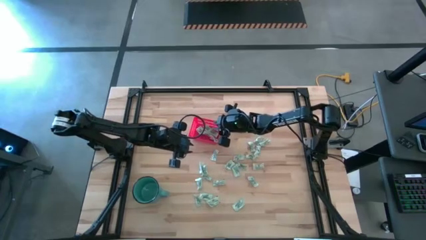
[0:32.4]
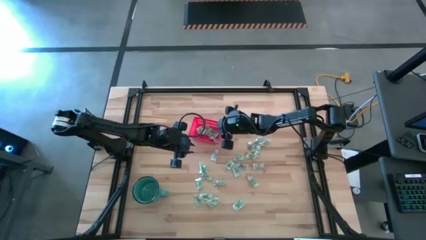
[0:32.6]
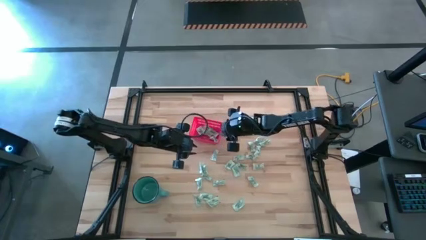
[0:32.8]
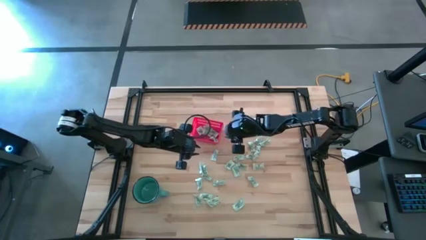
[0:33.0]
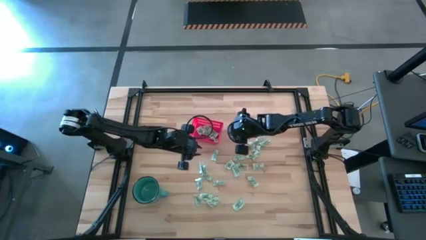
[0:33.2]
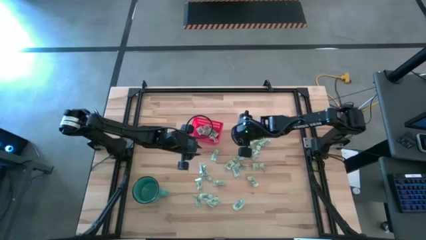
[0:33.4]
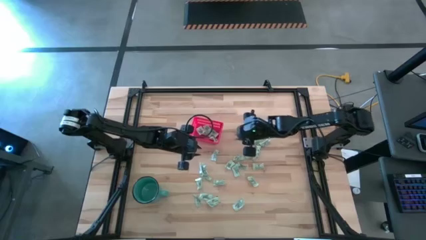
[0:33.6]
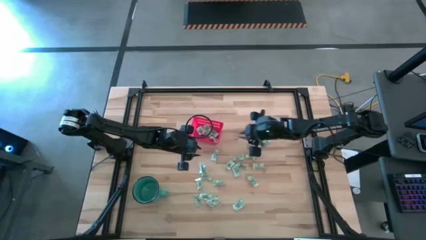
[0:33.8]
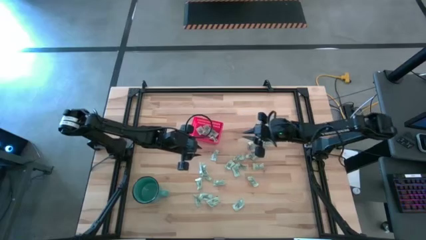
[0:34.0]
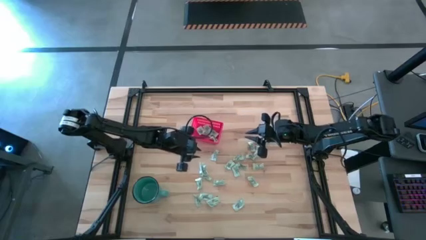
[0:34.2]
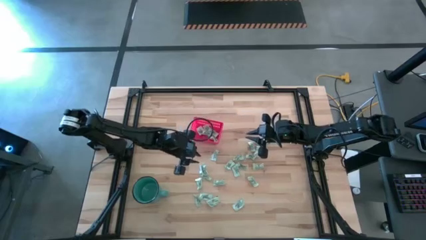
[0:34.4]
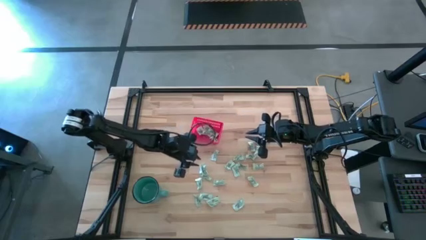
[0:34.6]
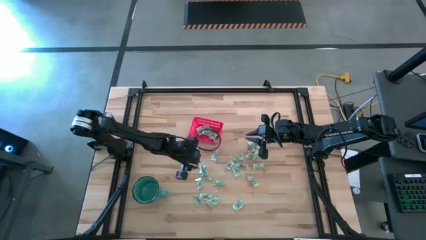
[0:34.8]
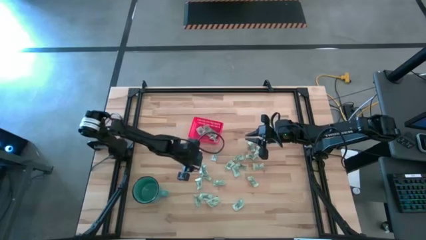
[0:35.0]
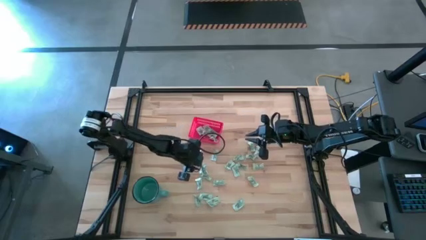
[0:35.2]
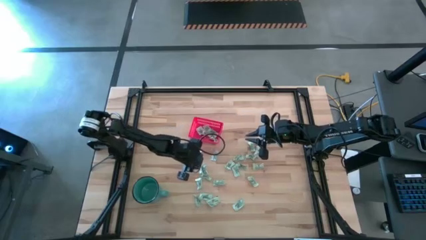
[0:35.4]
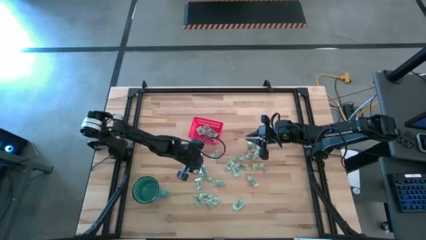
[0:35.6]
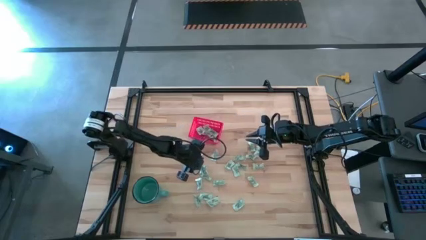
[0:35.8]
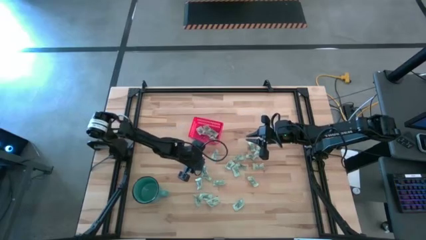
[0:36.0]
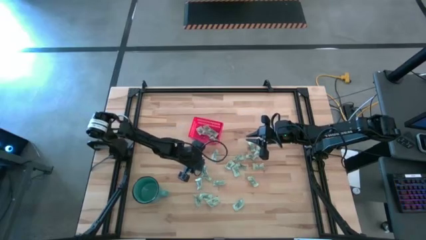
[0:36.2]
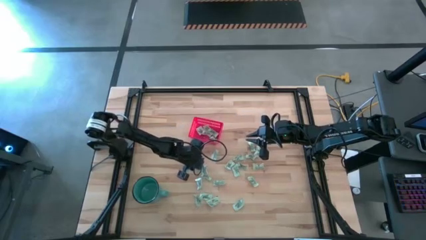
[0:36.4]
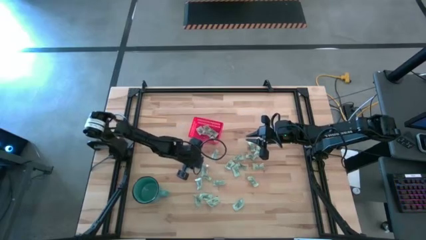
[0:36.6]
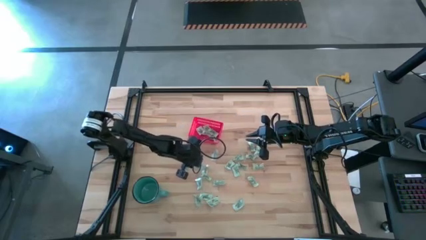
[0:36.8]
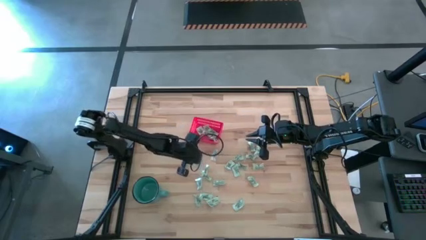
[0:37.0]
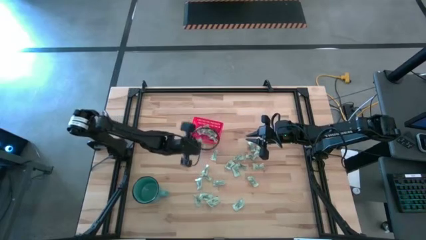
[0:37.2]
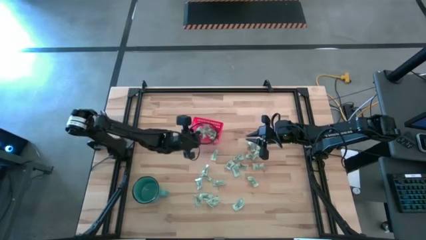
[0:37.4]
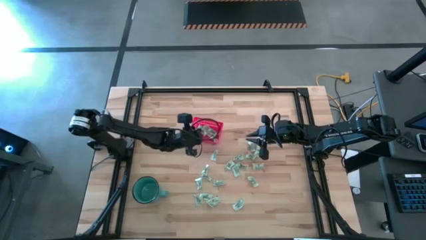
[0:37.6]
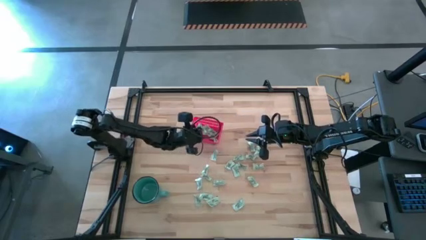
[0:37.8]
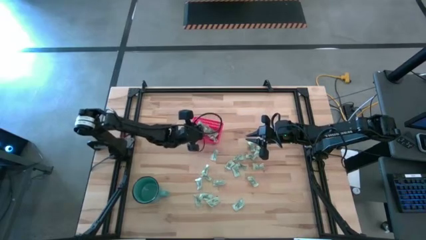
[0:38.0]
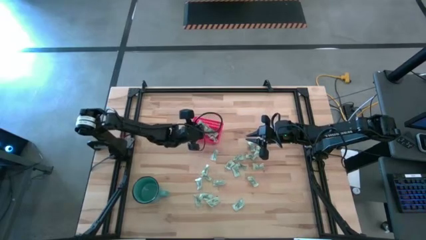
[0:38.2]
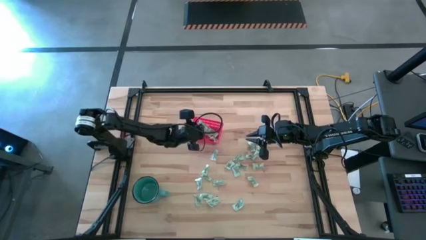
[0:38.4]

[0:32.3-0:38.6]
Task: Pick and place items into bin
Put the stevia packet into the red bin

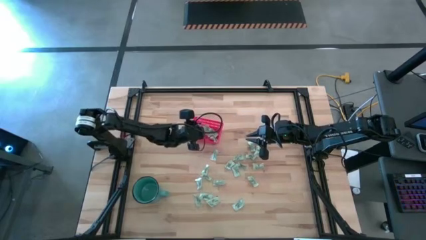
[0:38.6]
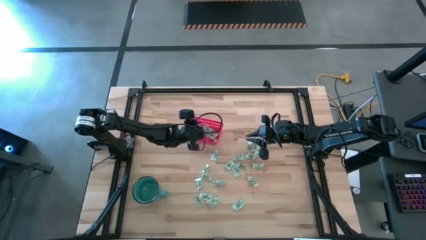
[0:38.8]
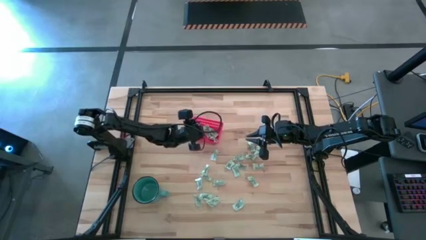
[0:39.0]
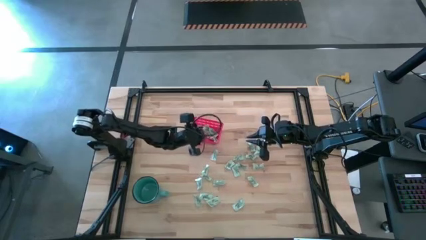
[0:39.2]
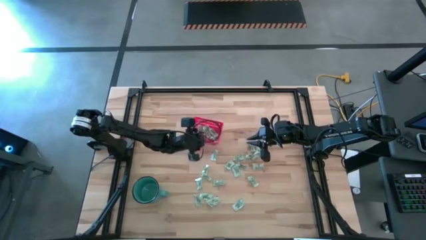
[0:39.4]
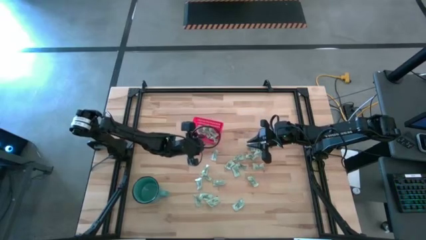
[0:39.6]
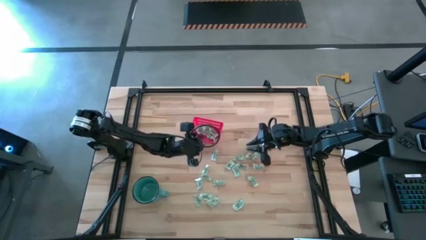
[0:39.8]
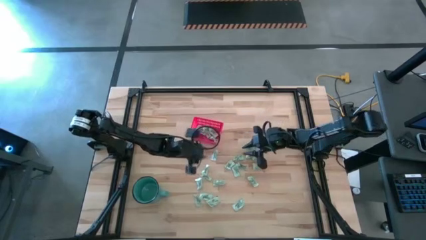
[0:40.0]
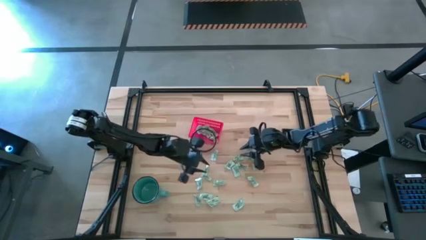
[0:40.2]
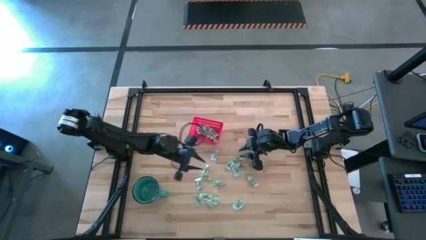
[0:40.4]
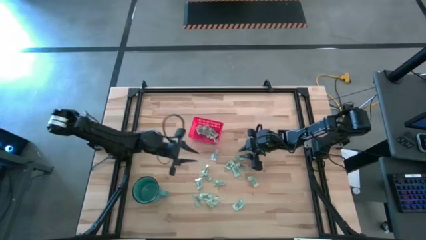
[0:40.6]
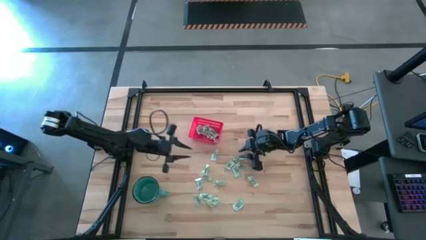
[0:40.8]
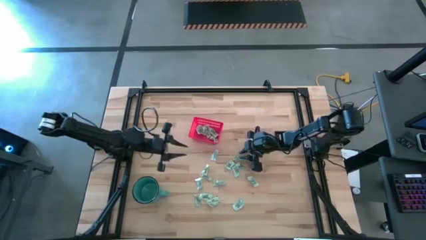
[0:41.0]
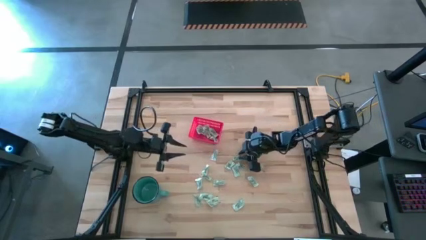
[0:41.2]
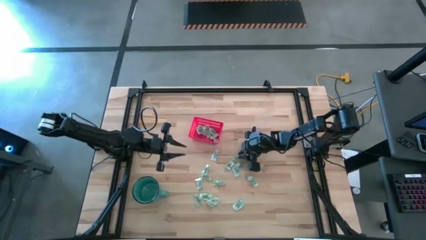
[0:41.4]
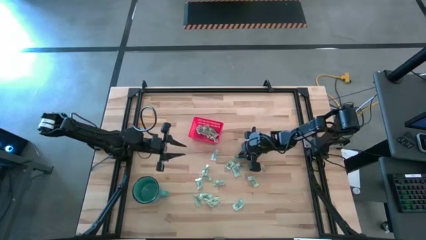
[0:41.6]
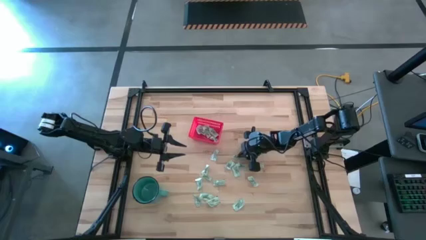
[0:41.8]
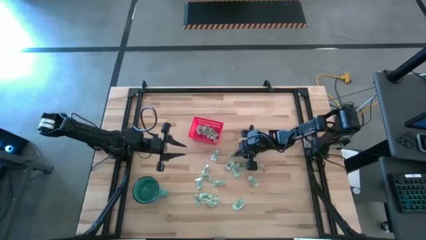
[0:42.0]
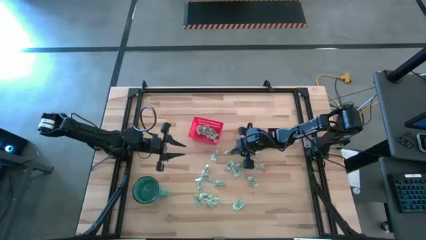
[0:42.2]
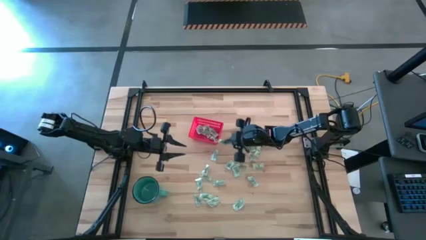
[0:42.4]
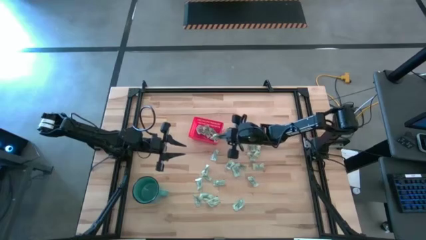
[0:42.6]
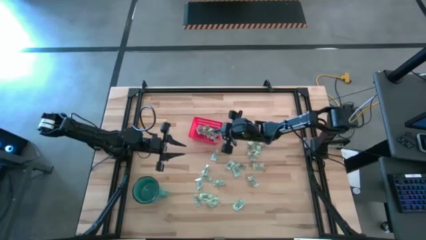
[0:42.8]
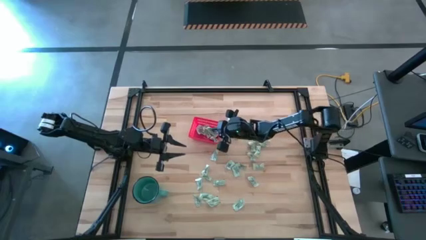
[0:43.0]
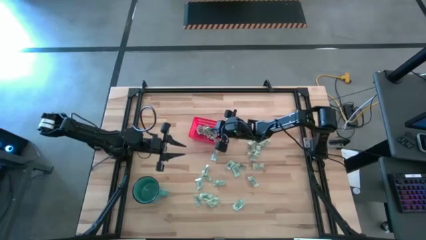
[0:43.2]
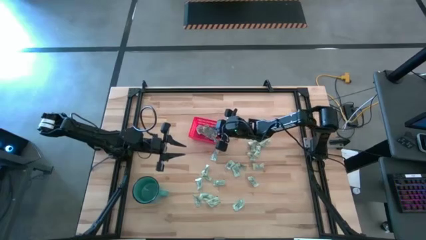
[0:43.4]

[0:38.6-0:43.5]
Put the stevia packet into the red bin

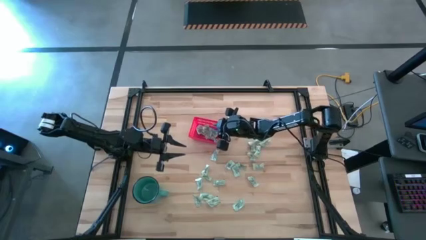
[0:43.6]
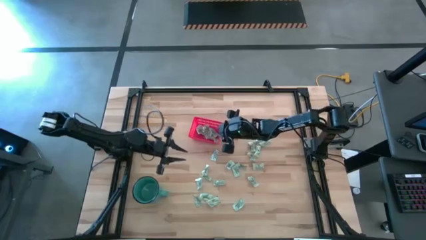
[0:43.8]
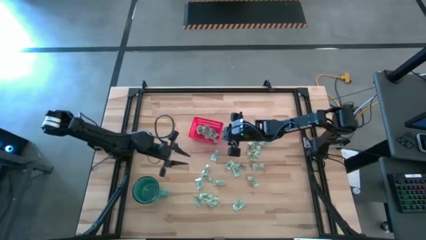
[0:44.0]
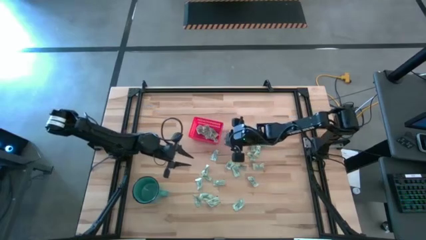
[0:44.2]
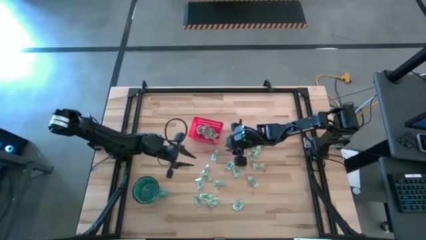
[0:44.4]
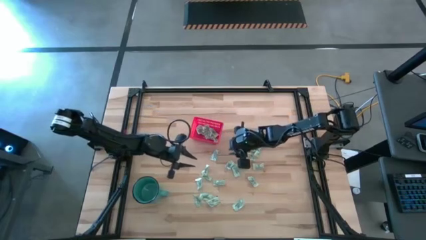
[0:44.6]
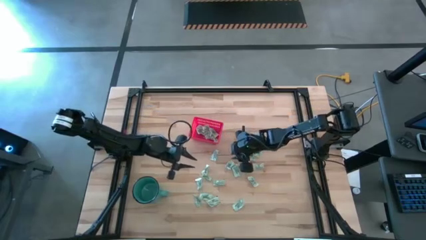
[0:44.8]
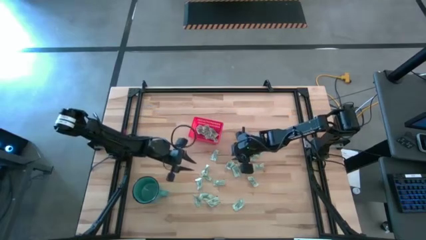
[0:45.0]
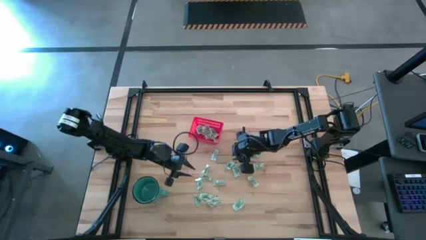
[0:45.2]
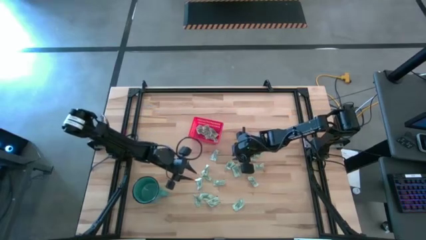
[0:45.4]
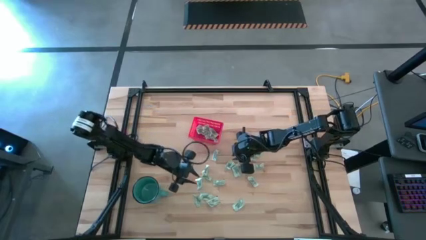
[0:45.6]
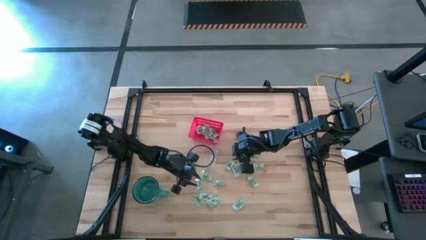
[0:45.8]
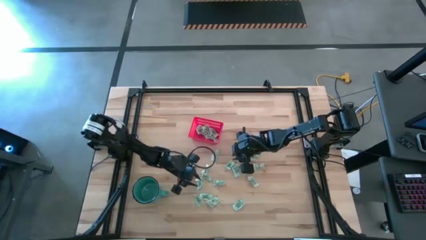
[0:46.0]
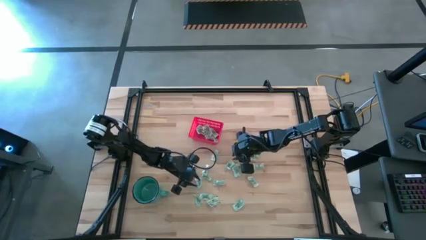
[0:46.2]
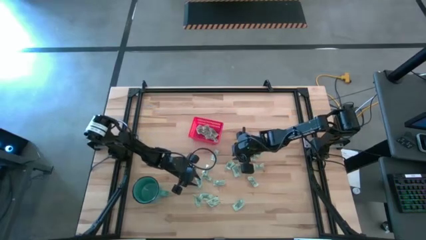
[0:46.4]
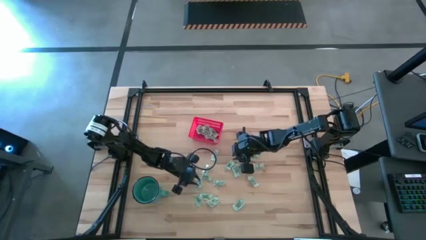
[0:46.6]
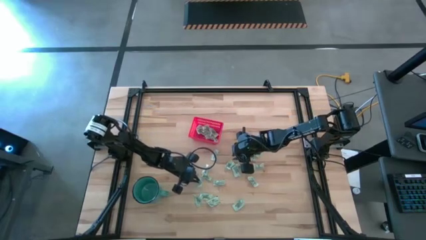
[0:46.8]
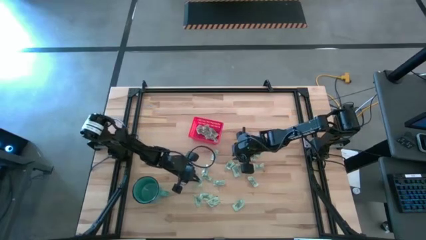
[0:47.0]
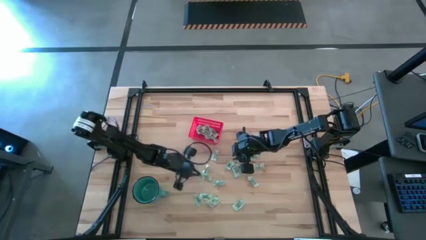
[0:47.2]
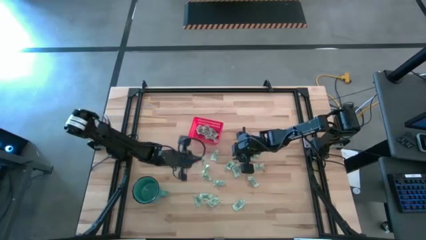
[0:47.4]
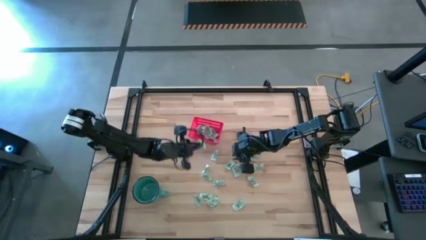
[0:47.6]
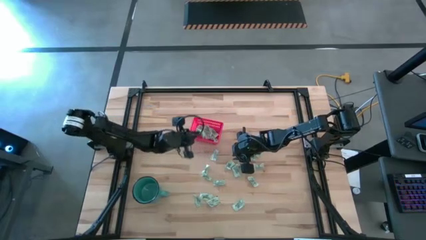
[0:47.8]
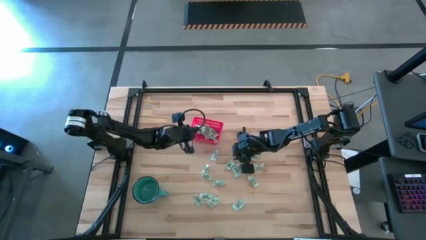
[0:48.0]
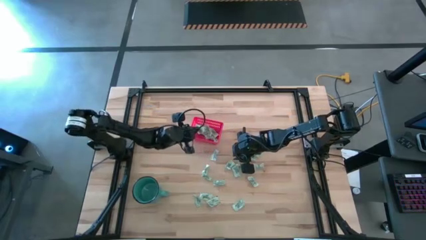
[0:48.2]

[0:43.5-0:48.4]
Put the stevia packet into the red bin
